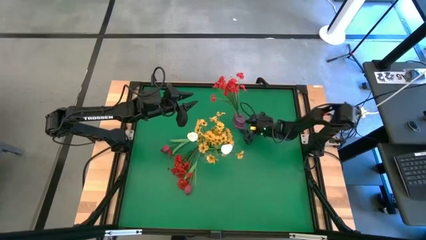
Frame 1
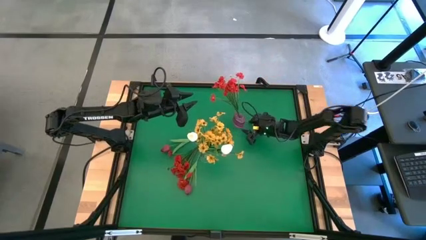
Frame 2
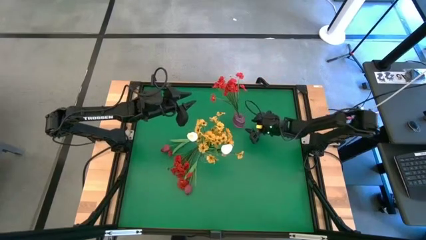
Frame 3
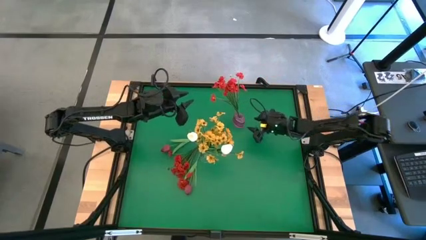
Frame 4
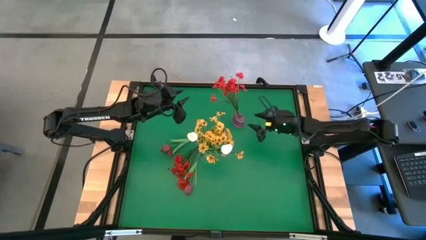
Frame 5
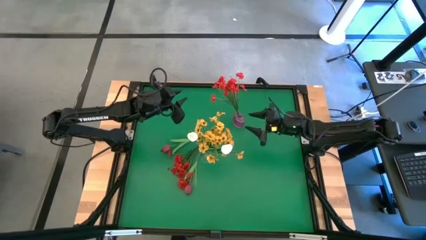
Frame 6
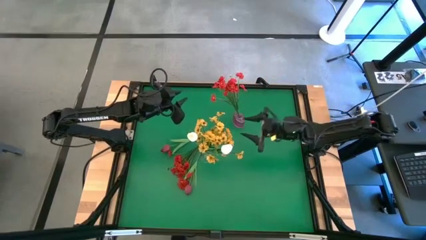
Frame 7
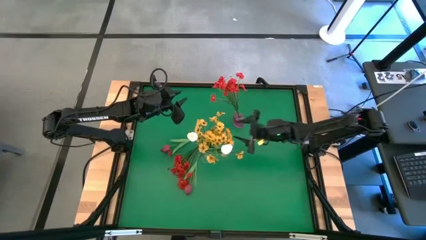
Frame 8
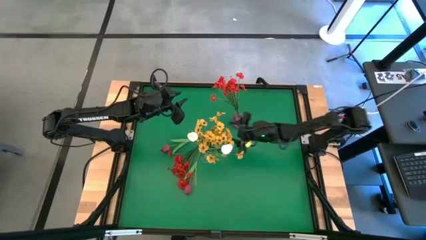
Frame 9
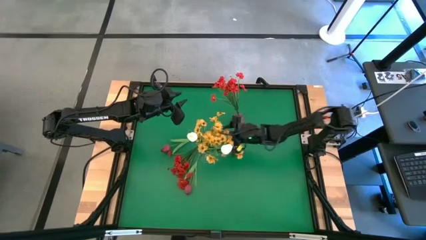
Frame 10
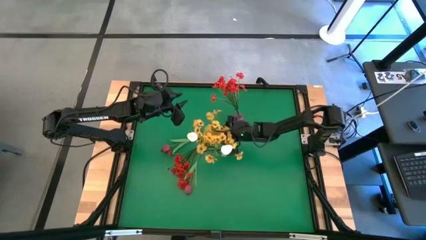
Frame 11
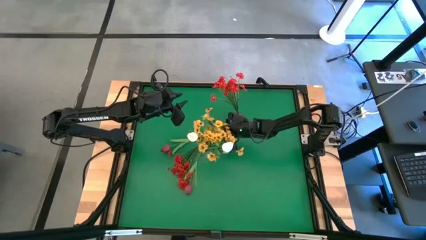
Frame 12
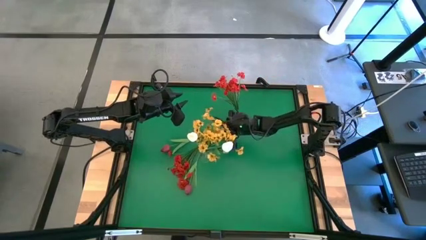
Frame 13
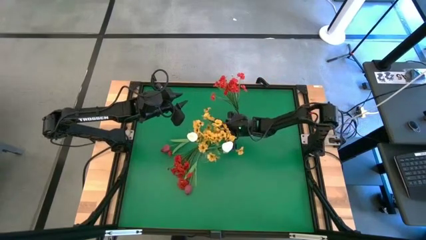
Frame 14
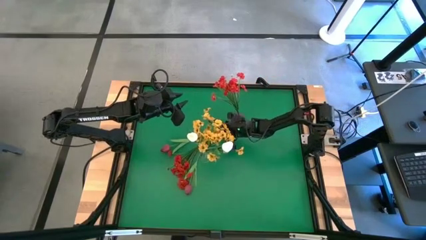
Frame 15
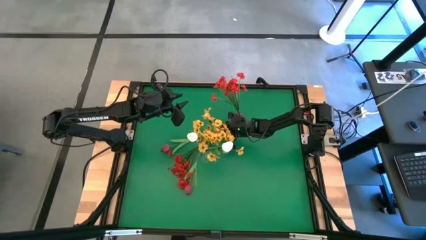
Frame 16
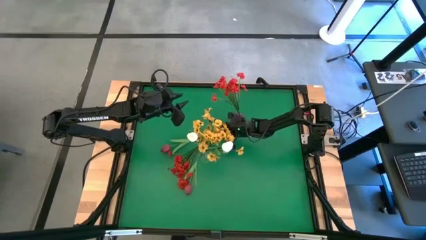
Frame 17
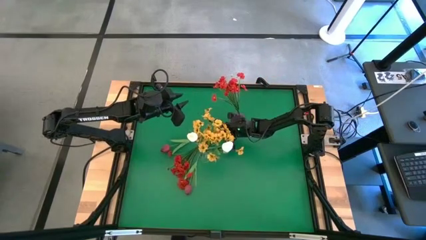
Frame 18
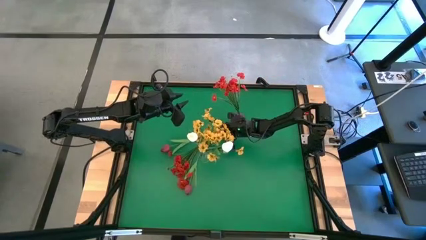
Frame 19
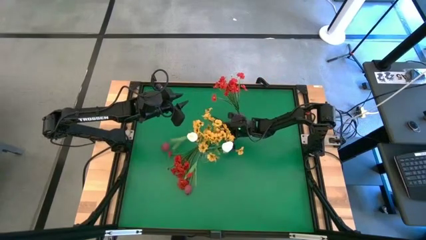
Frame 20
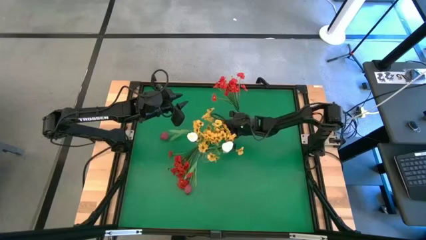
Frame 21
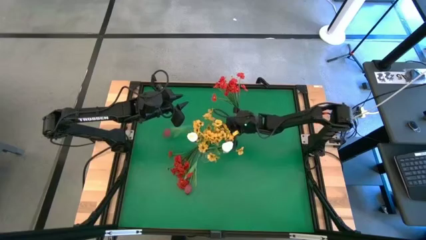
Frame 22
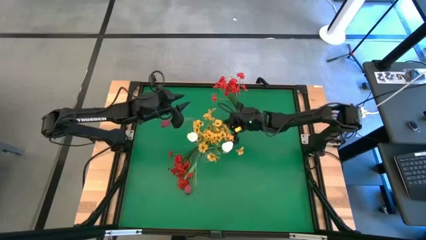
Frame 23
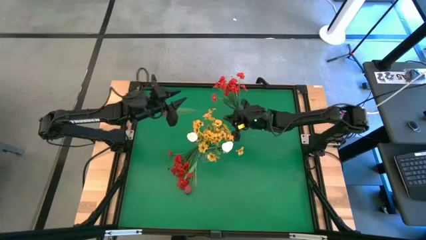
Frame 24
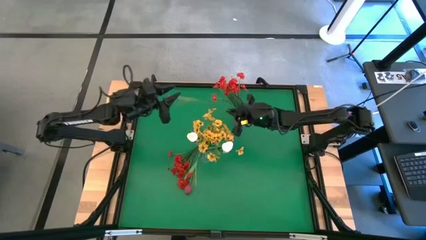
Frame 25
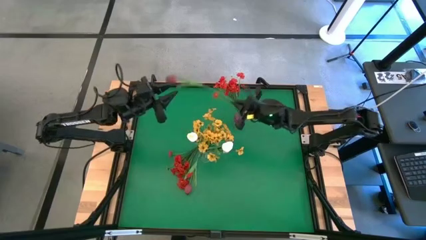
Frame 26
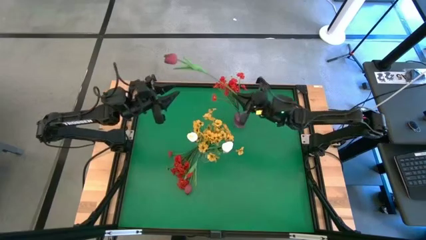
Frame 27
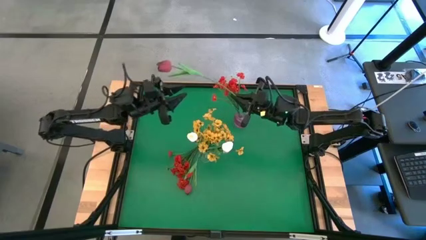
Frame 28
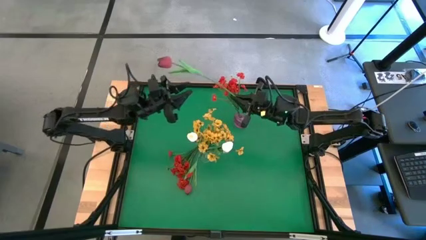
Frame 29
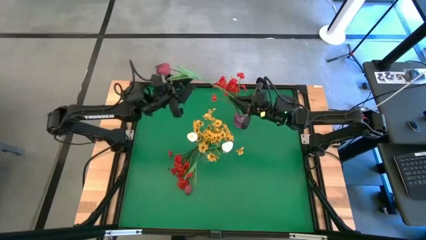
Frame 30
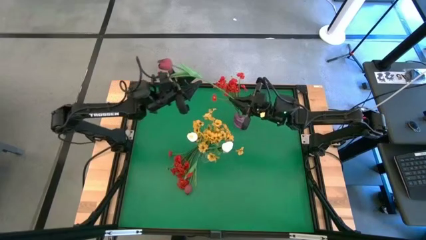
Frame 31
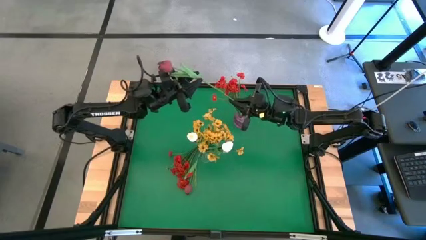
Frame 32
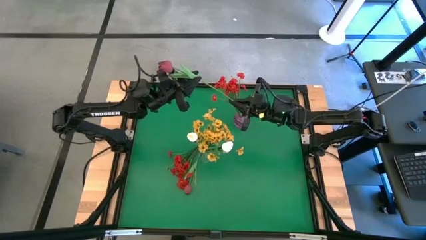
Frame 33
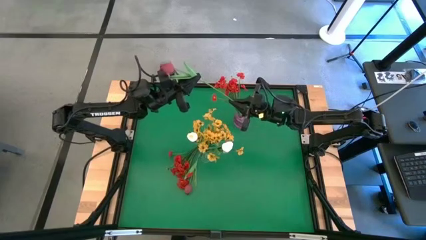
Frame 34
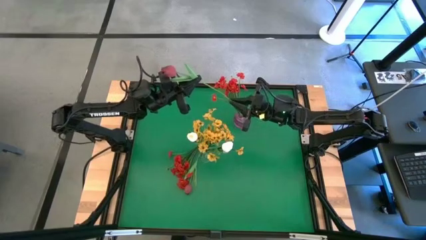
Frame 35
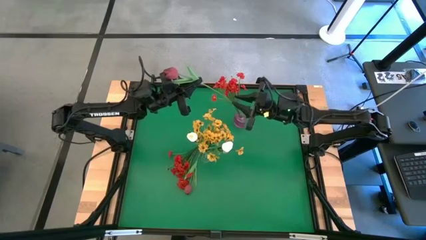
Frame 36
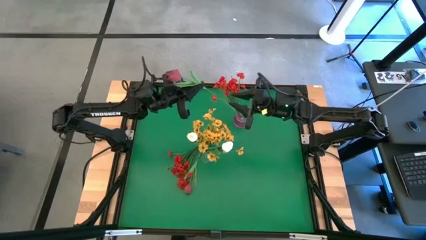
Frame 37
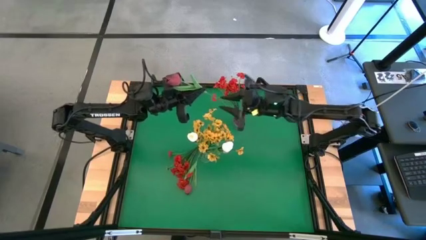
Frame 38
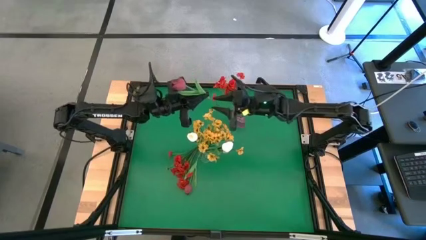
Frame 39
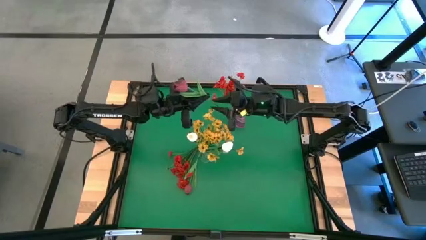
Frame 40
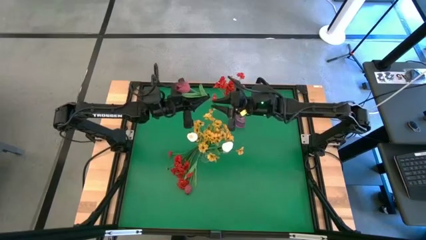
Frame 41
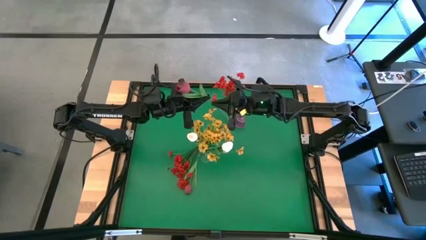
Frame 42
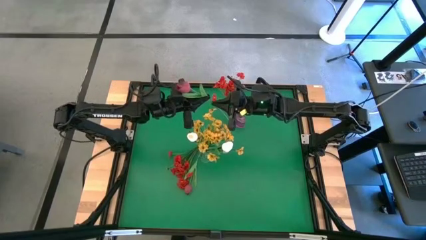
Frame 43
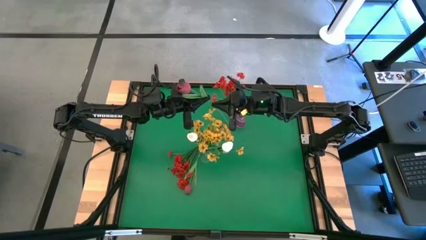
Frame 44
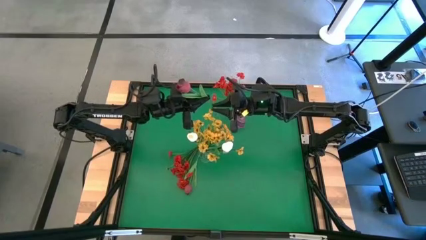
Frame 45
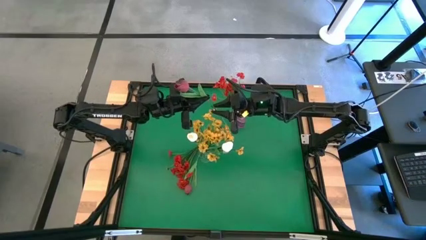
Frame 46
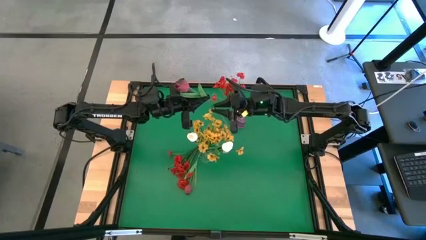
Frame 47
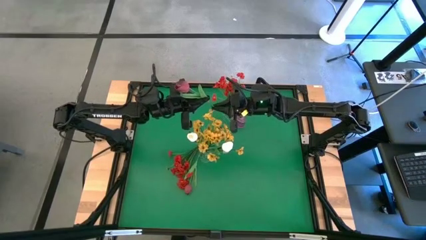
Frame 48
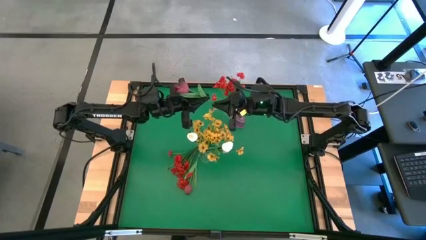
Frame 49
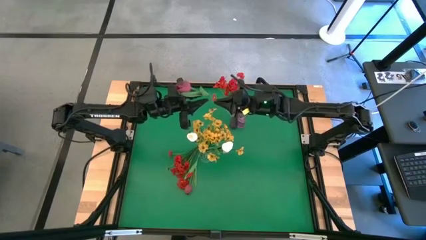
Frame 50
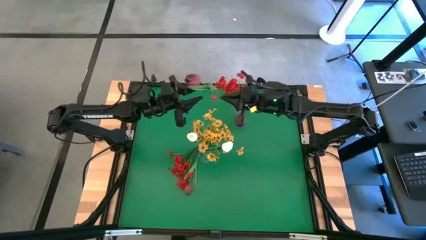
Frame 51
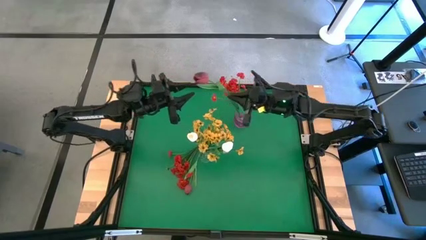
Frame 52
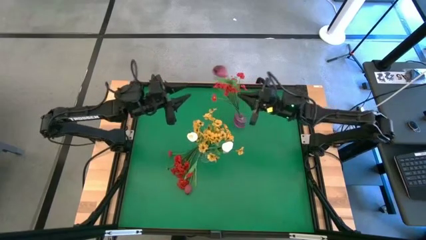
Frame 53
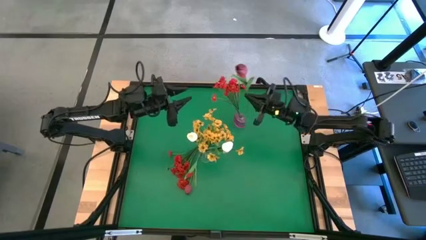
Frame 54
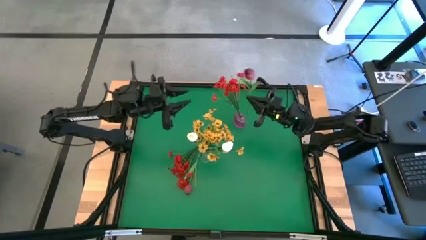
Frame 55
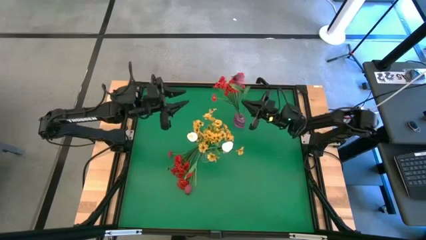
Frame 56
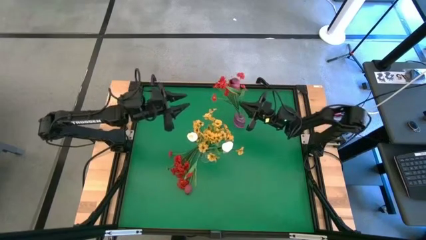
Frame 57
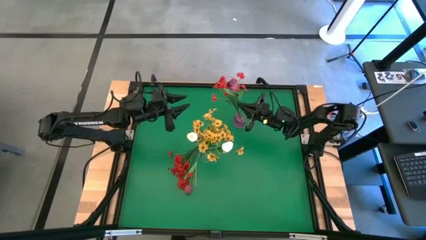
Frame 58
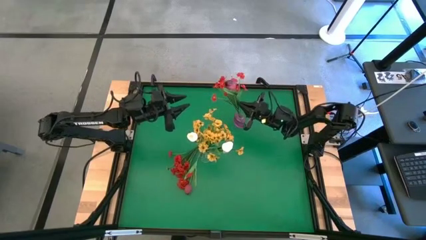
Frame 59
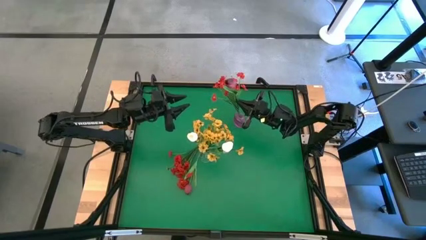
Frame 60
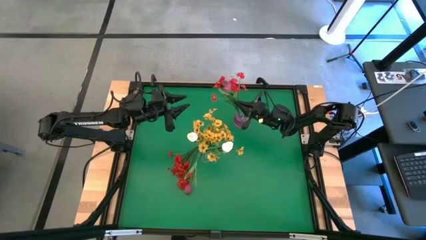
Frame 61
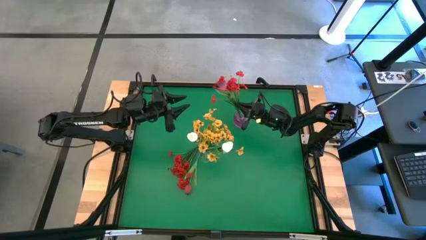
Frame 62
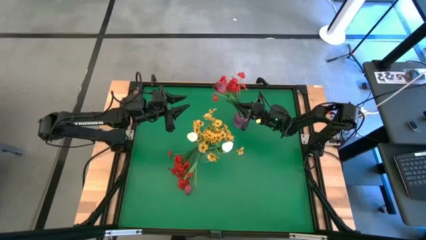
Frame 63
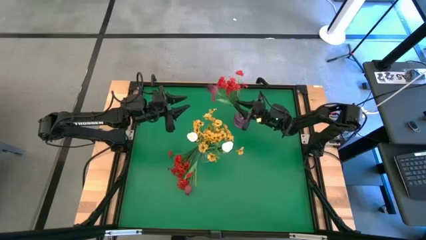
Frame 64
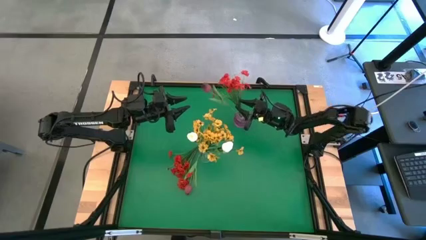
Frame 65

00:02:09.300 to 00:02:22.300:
Task: Sort flowers into vase by color
Put the top red tulip into the violet vase

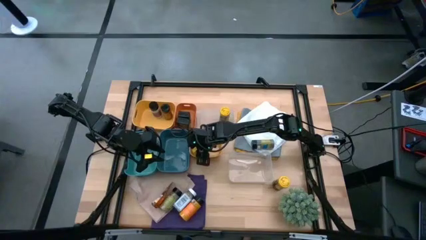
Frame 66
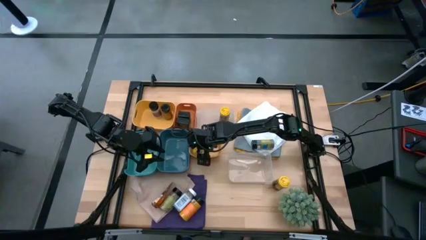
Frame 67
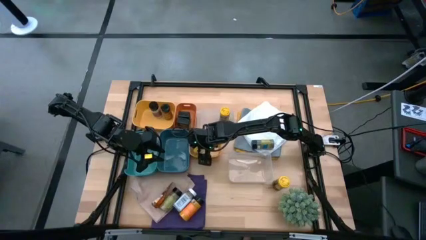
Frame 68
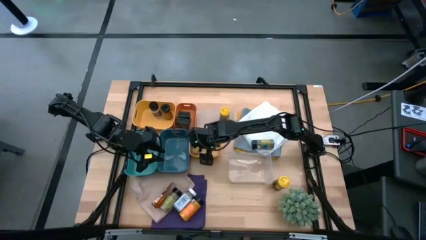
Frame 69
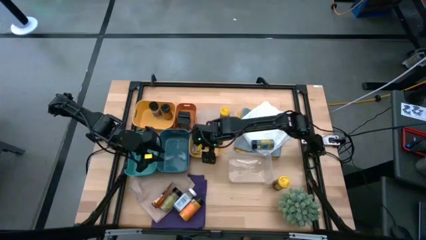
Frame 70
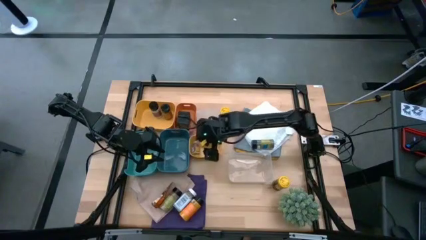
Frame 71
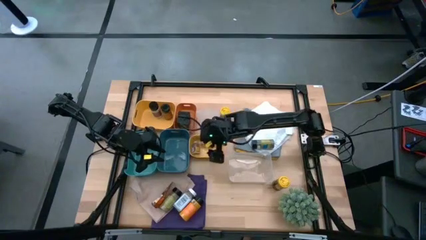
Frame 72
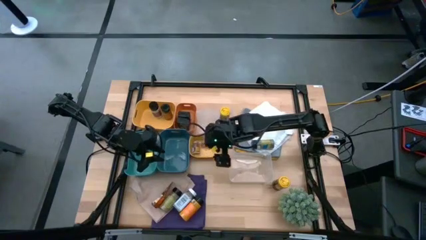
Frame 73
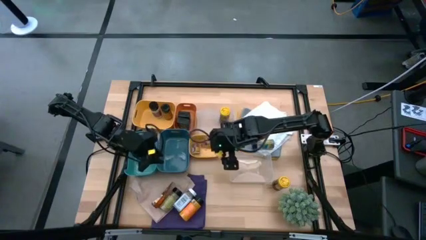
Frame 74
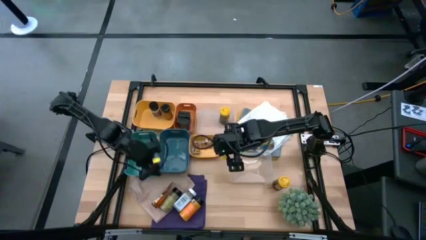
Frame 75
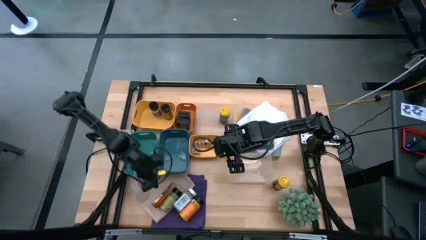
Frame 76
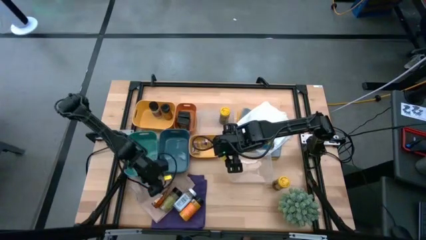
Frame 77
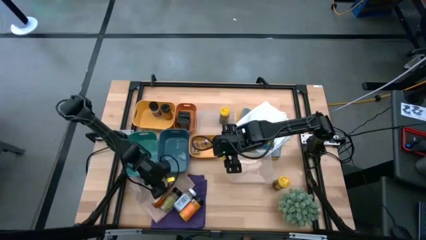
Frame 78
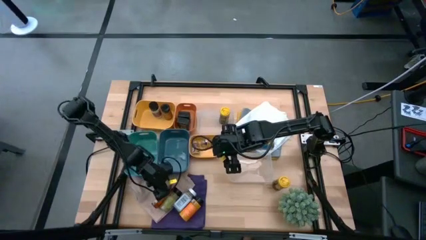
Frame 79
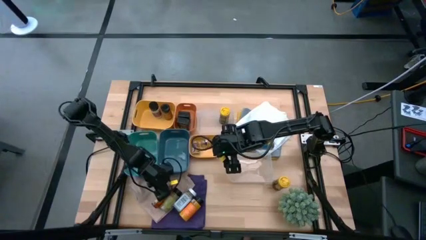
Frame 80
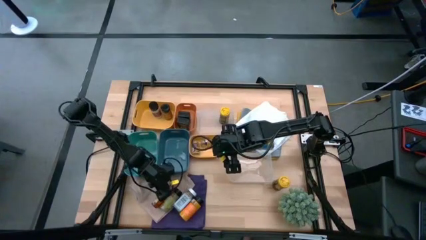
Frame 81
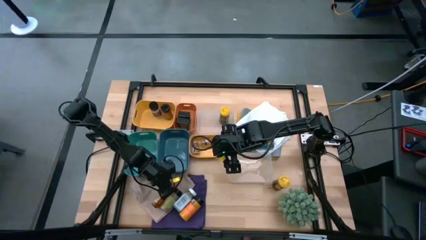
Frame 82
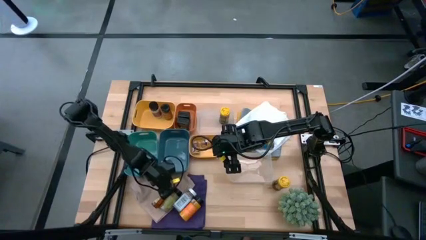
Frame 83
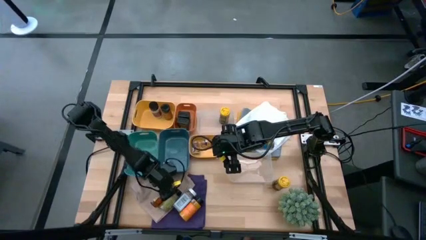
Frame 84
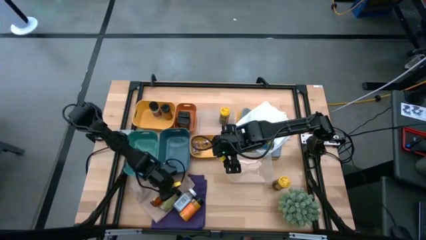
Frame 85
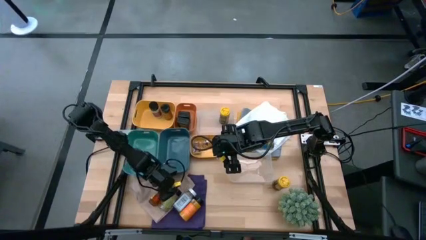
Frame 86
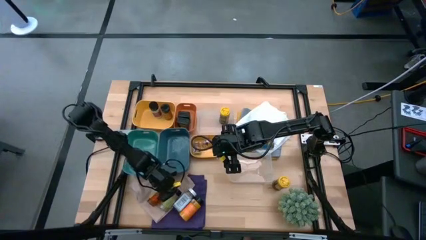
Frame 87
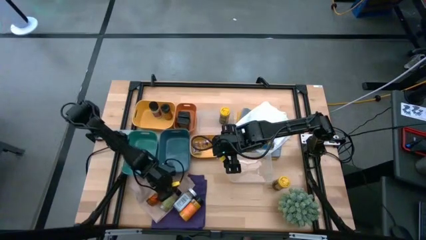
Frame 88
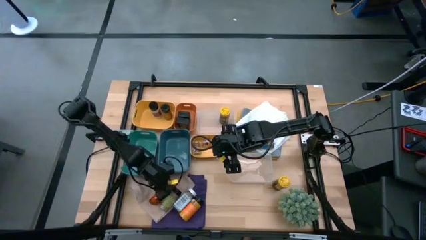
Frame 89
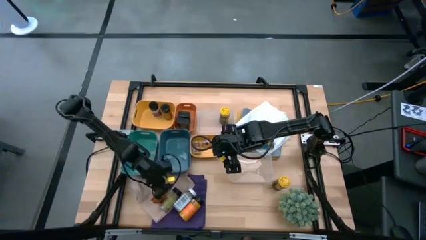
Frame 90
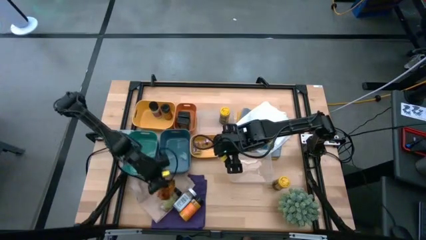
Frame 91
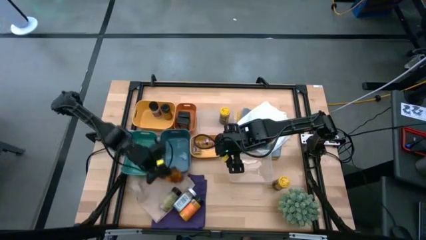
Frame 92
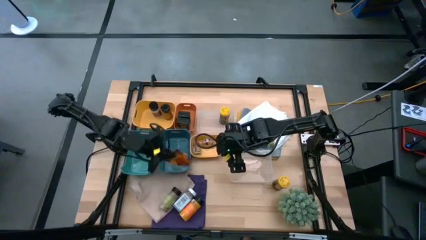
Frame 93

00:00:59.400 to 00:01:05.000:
Task: Sort spices by type
Put the orange spice bag into the blue bin
